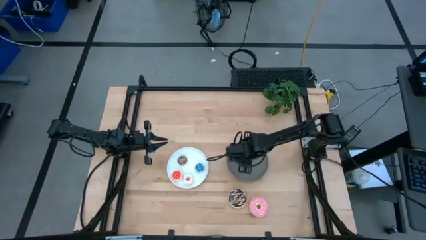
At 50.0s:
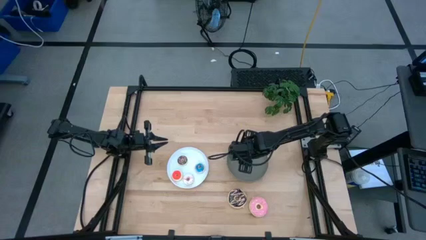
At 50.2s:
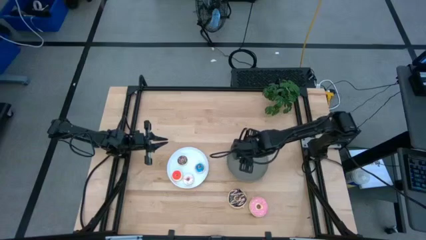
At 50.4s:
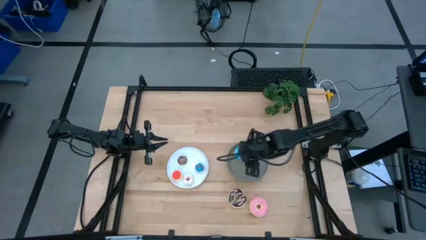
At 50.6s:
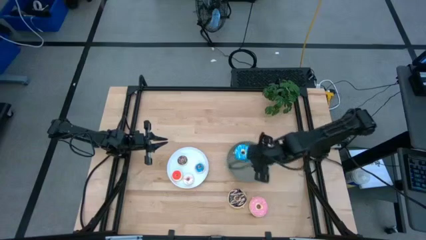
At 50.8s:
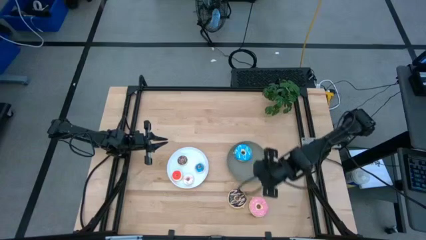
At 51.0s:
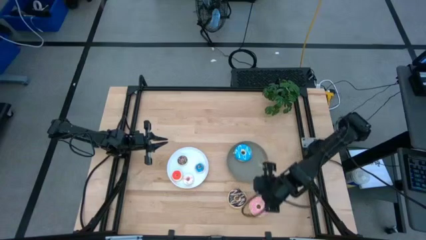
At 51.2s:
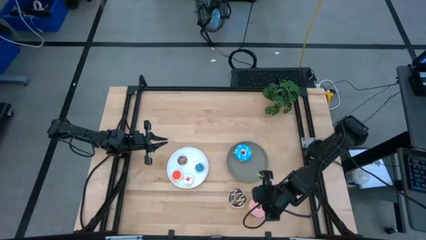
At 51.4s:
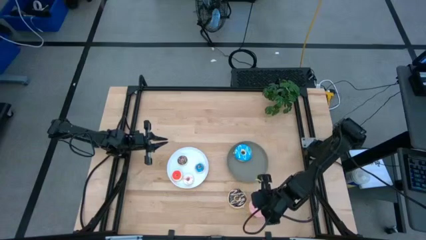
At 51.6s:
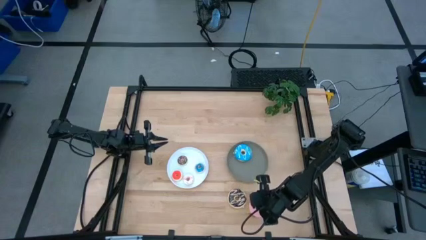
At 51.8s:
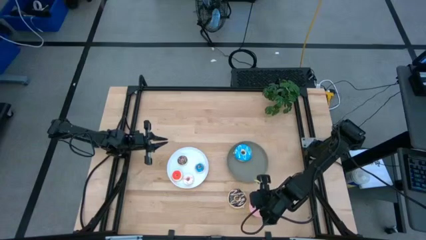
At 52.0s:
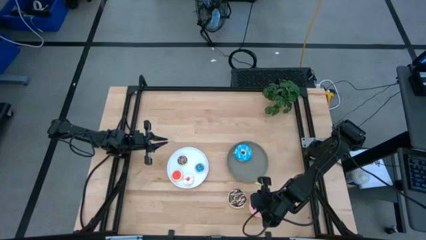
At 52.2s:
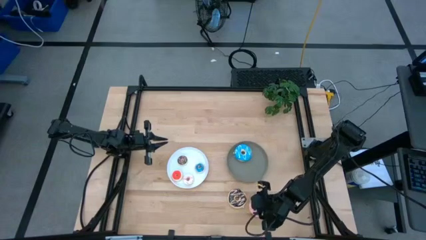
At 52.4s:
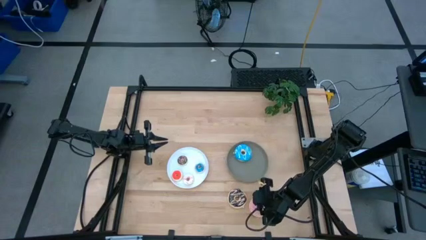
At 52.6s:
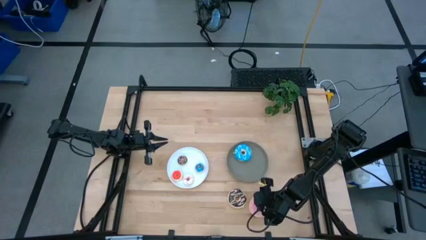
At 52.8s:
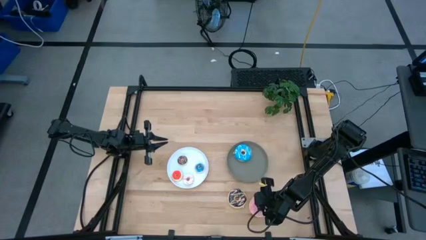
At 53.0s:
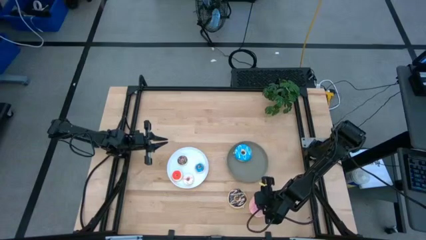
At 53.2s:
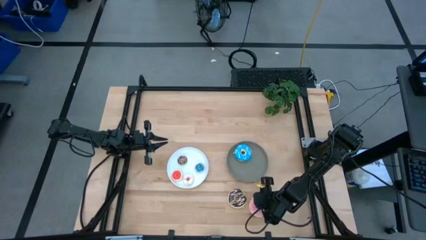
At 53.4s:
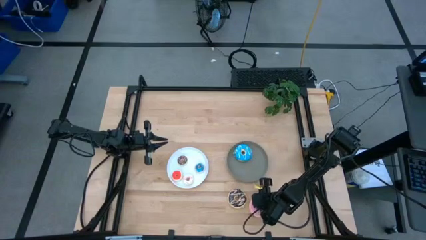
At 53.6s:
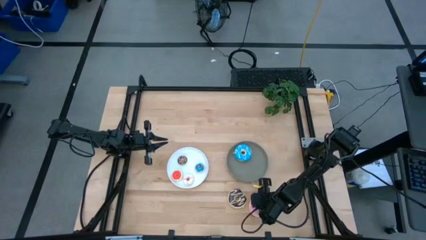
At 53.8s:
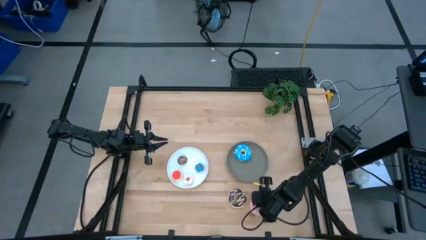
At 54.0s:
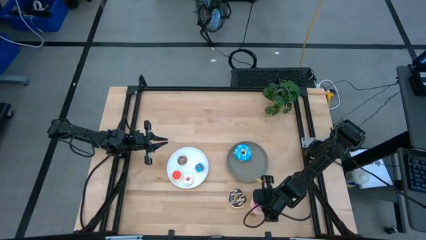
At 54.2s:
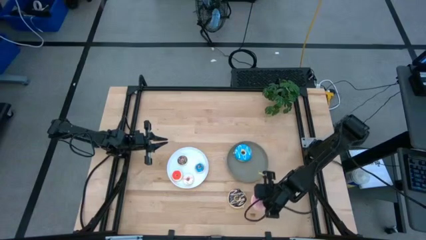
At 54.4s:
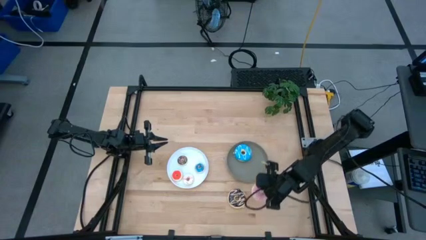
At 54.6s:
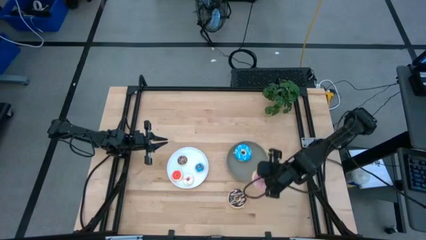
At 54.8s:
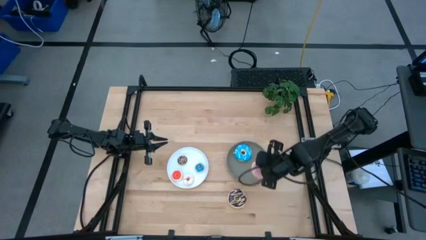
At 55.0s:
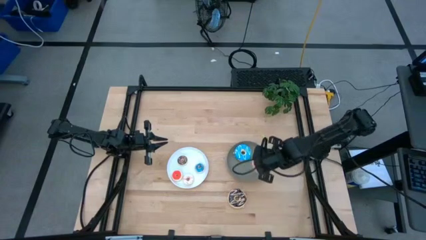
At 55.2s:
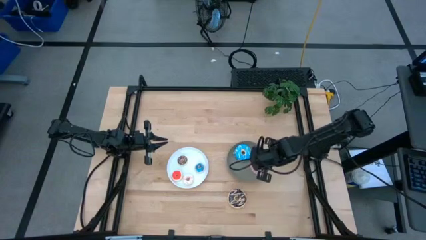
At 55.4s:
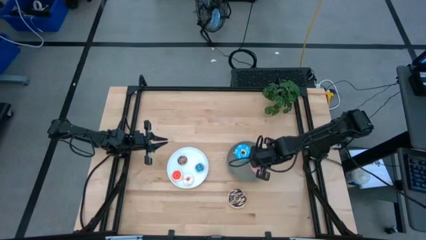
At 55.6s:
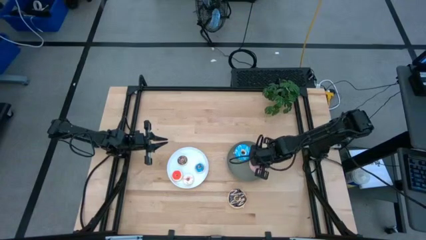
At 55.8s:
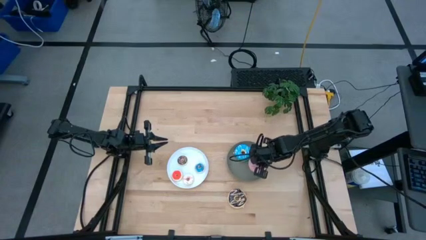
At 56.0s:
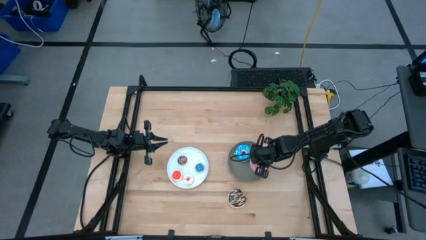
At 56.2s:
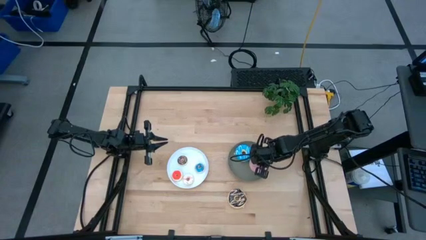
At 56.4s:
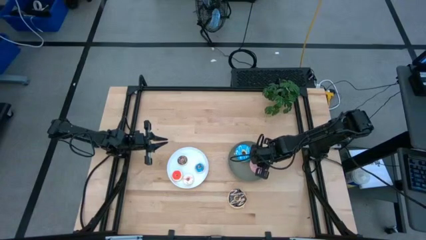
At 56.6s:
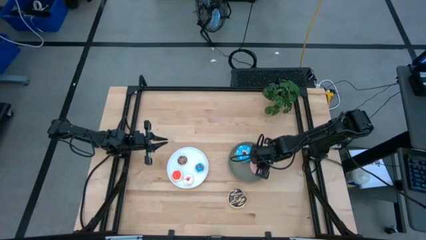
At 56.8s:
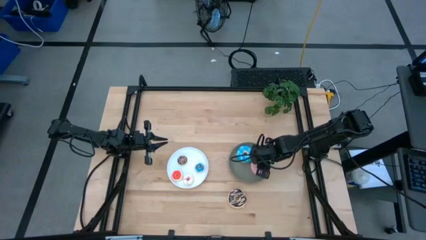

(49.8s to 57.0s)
Task: Pick & Place donuts
Put the large pink donut on the brown plate

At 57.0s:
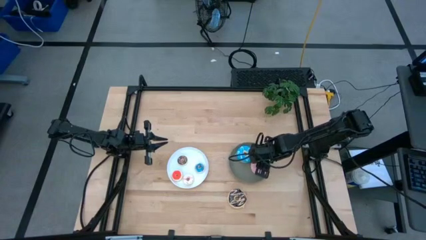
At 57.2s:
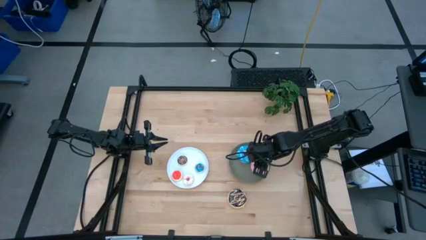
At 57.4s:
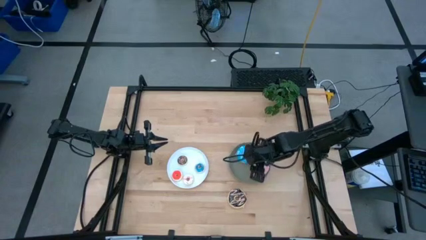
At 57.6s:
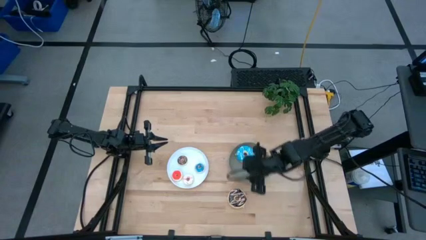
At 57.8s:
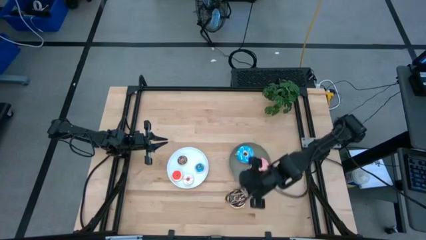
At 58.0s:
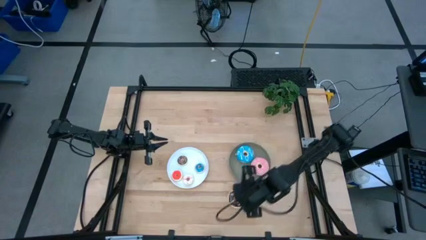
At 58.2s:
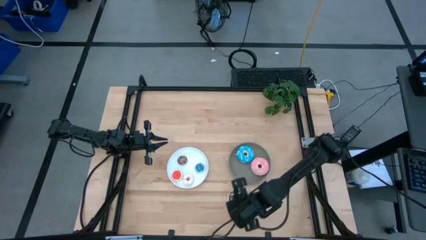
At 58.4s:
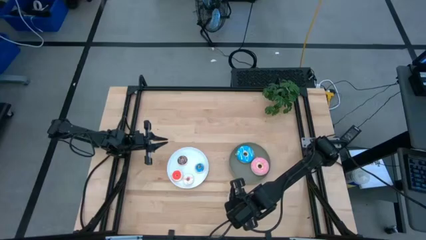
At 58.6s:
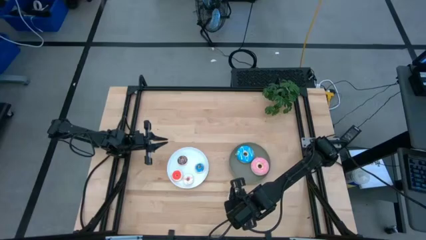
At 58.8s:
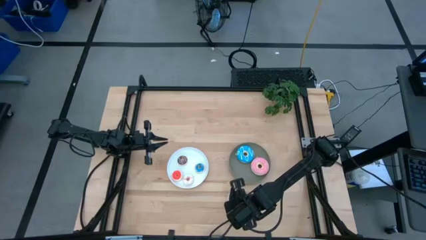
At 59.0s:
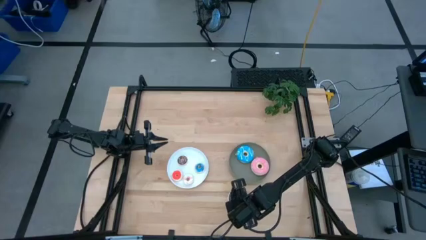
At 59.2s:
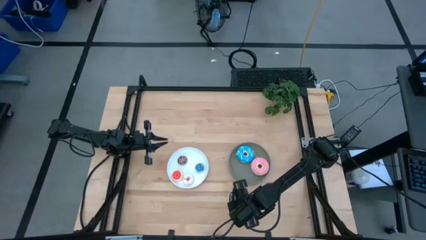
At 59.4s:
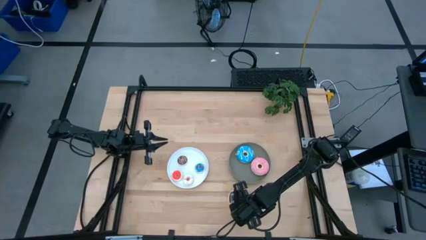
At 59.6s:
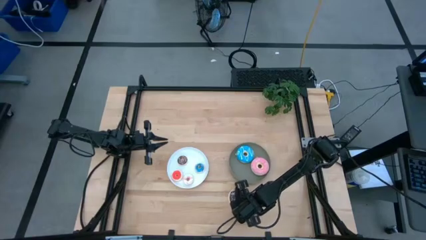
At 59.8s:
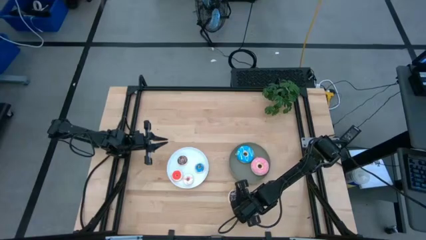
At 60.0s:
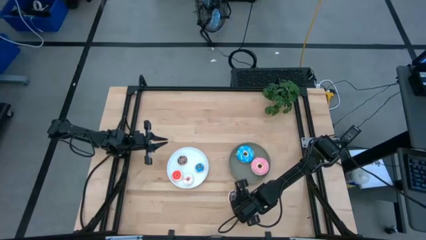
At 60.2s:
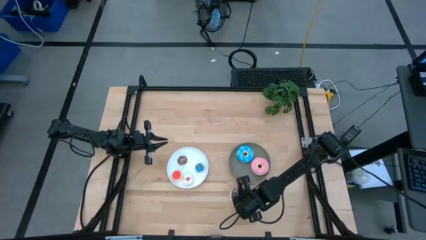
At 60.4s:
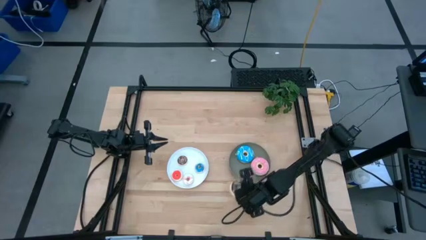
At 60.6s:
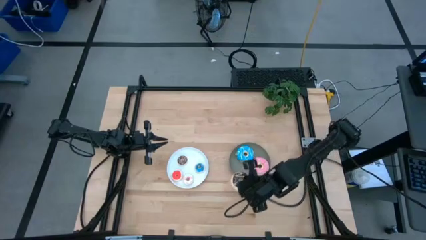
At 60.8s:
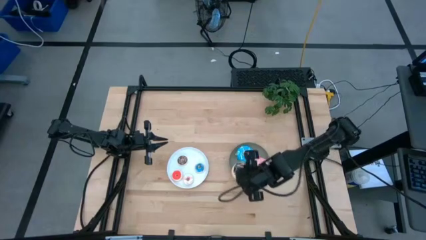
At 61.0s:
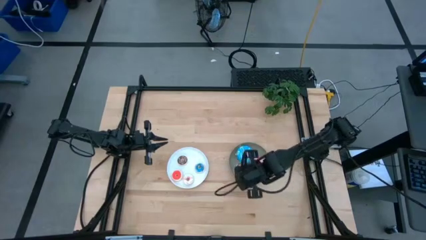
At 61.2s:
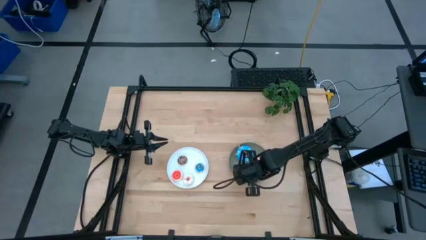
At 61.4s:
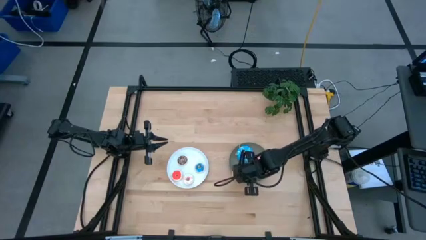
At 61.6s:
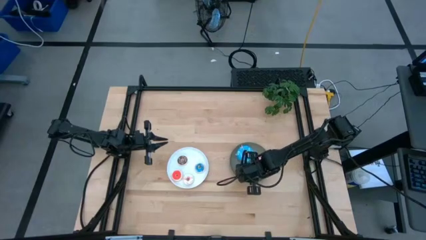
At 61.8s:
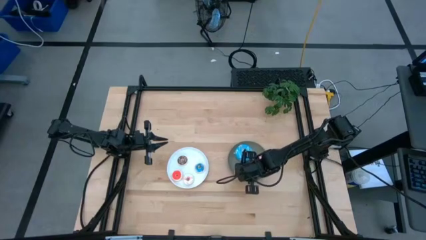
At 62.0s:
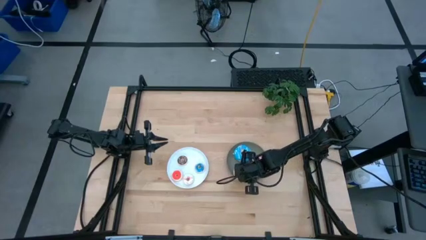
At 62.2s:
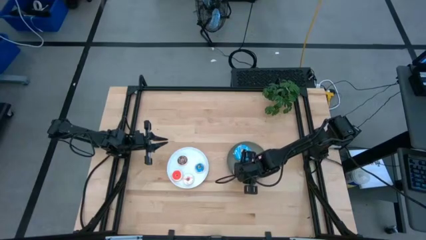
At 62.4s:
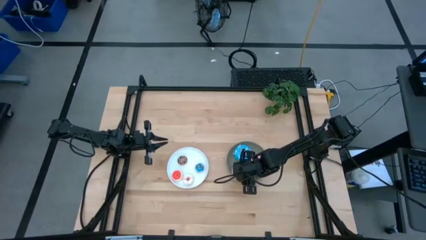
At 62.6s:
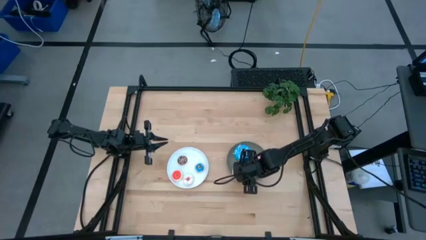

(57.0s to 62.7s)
Put the large brown donut on the brown plate

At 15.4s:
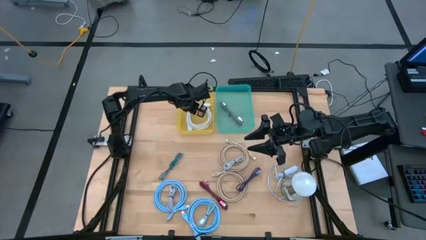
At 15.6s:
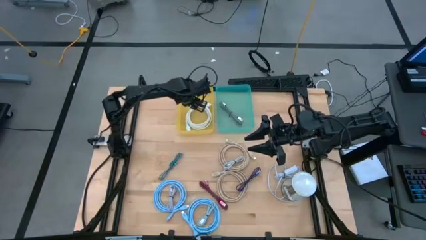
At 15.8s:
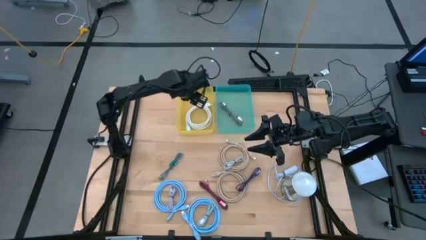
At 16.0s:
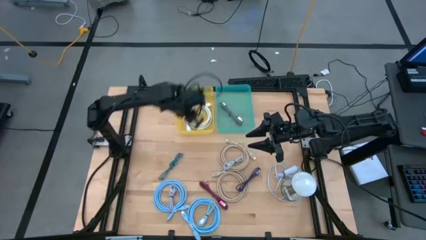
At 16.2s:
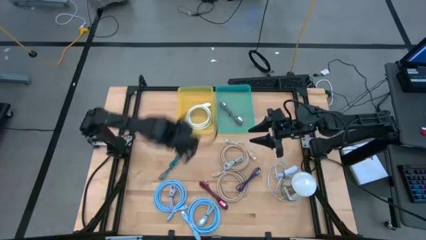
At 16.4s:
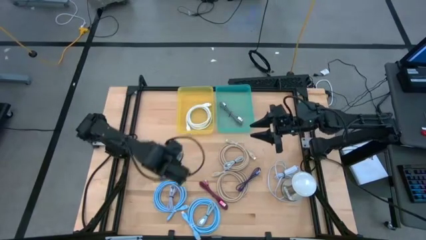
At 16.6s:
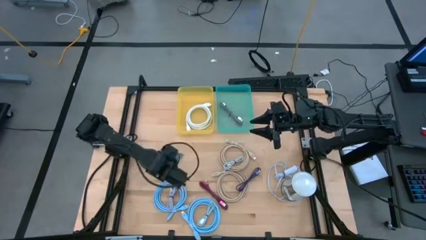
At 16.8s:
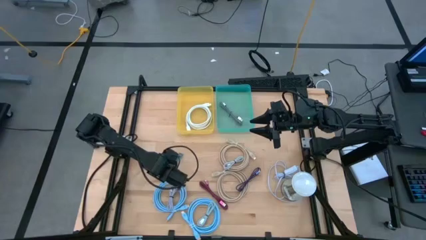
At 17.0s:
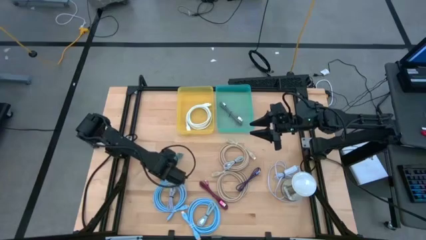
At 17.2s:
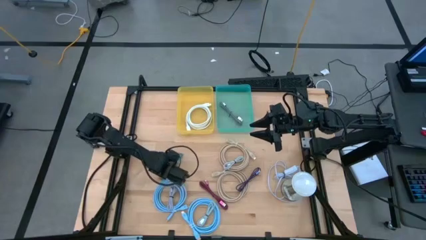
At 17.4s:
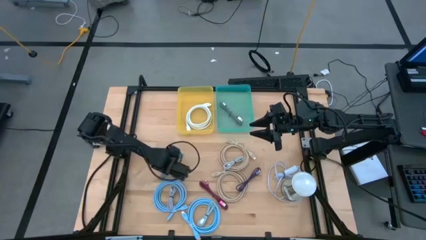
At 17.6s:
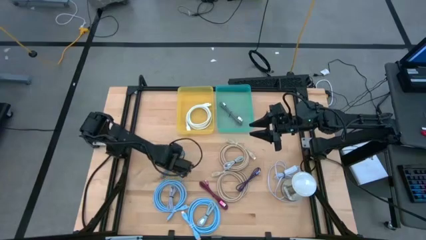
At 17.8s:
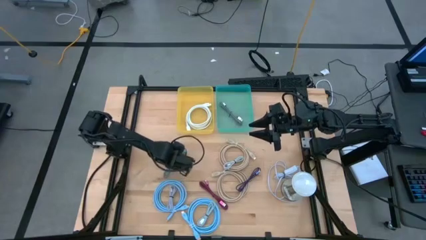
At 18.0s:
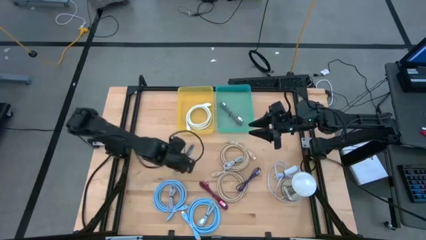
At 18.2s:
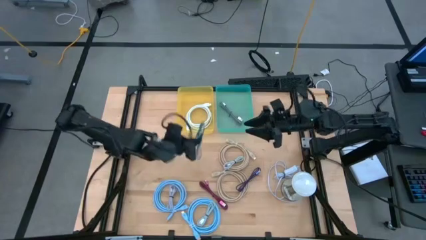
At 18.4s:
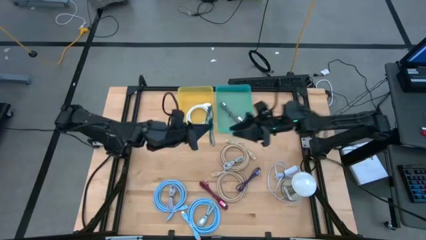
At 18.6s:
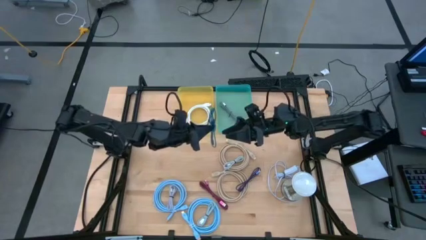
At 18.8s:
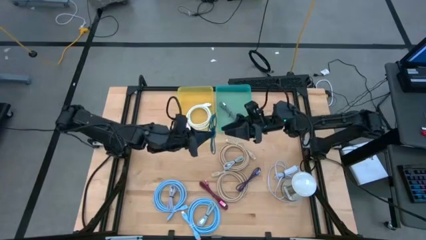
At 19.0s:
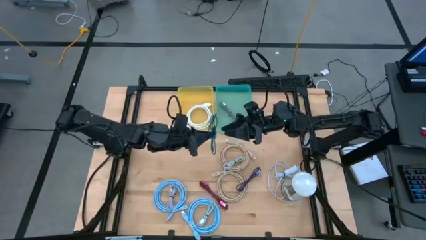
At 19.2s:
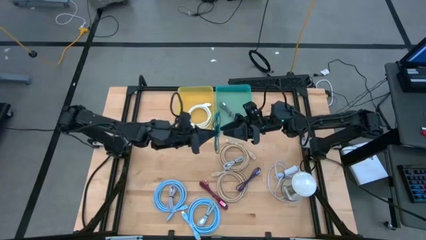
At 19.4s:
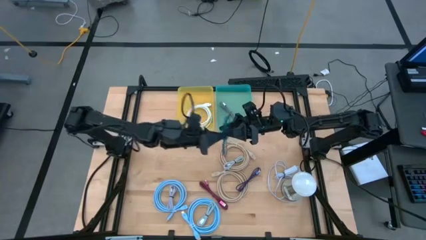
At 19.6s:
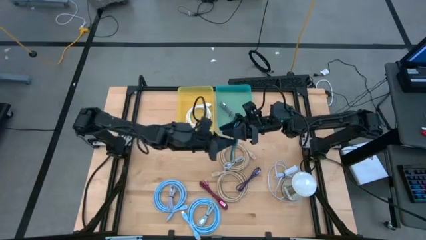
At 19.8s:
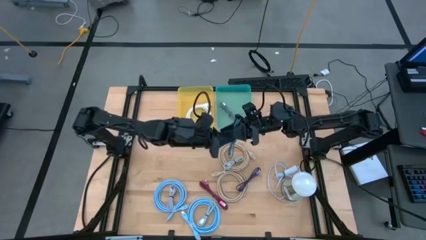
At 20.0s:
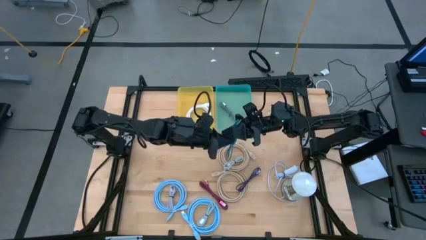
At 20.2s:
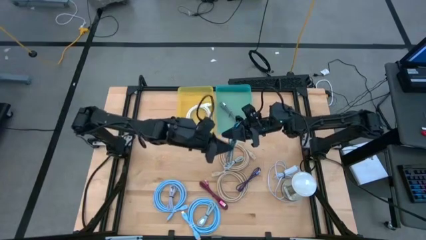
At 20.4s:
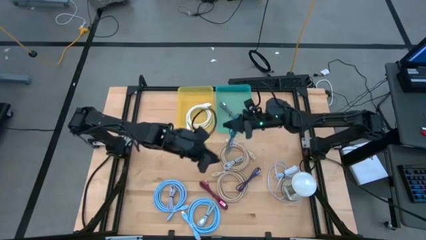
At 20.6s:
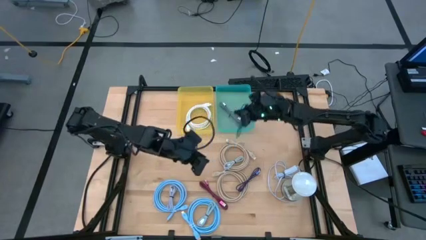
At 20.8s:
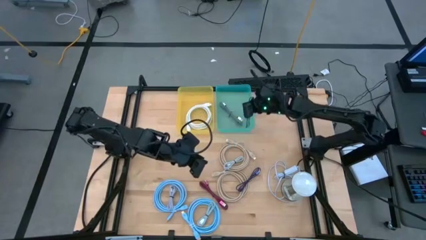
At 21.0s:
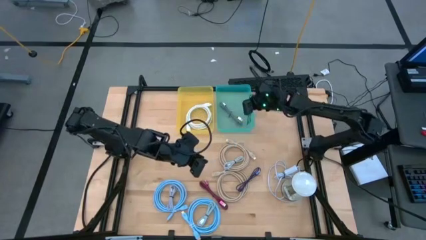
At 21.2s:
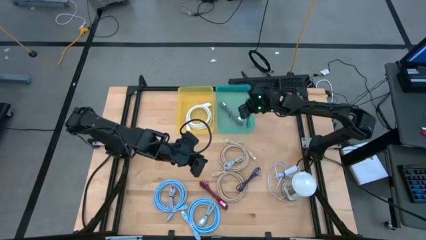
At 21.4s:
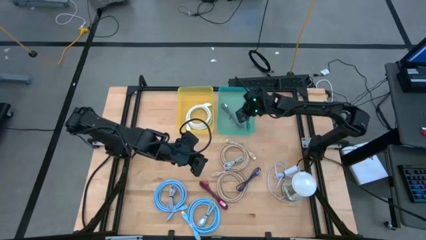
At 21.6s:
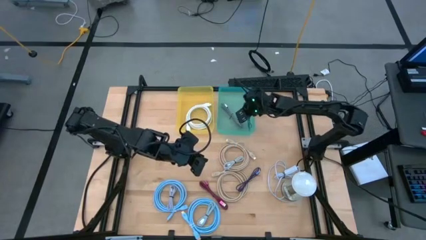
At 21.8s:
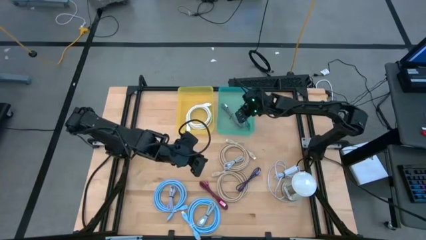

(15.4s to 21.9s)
Task: Pick and place USB-C Cables
Put the small black and blue charger cable into the green bin
